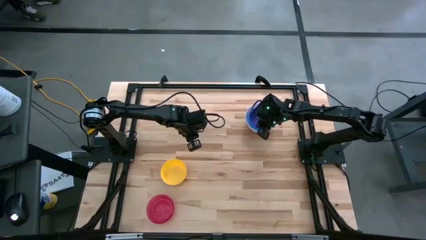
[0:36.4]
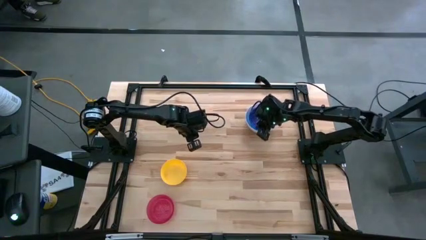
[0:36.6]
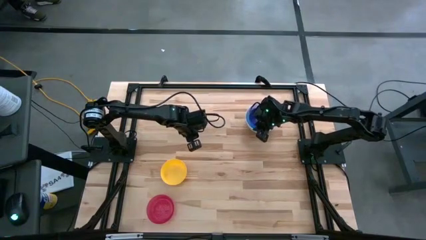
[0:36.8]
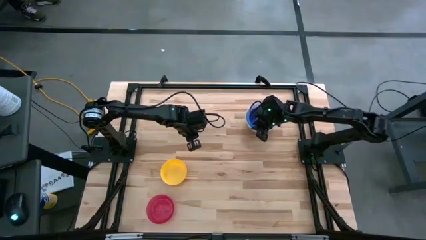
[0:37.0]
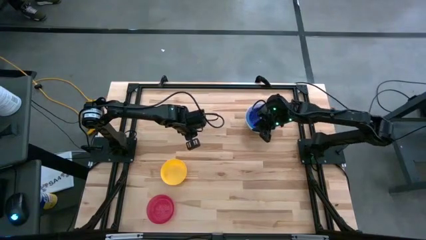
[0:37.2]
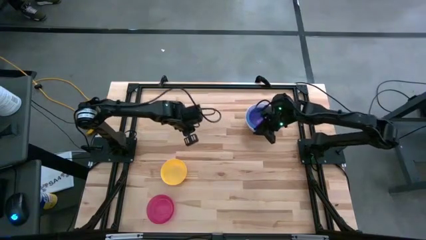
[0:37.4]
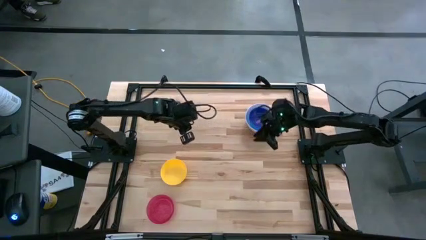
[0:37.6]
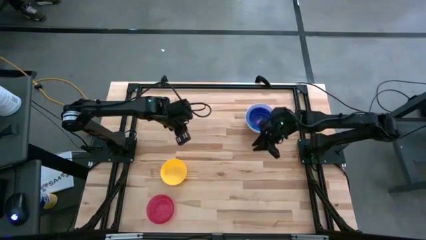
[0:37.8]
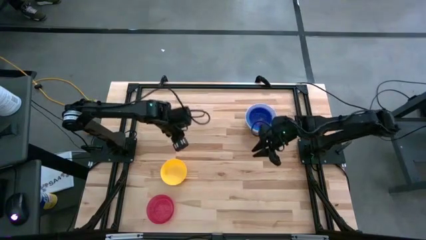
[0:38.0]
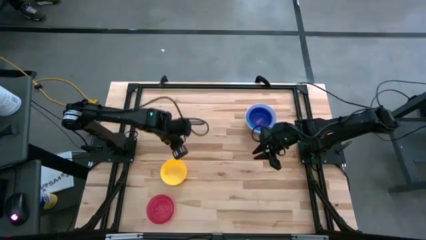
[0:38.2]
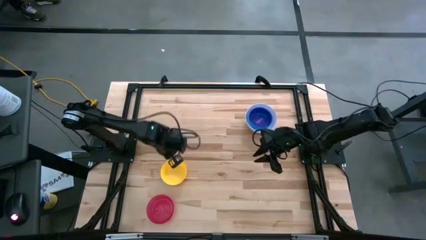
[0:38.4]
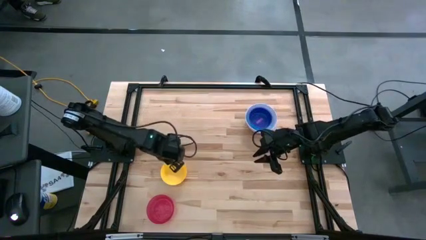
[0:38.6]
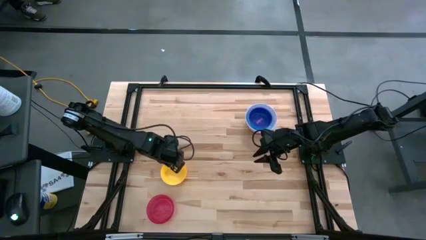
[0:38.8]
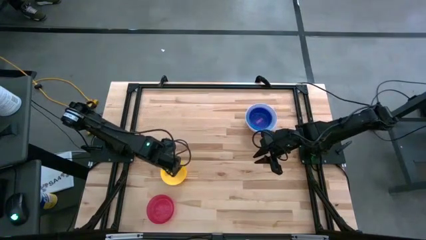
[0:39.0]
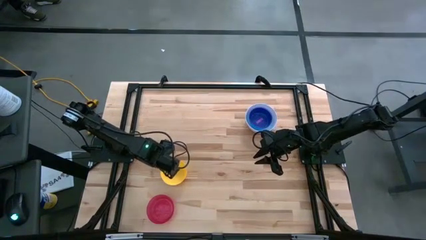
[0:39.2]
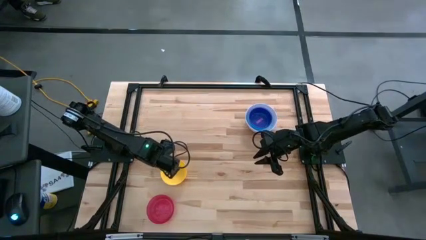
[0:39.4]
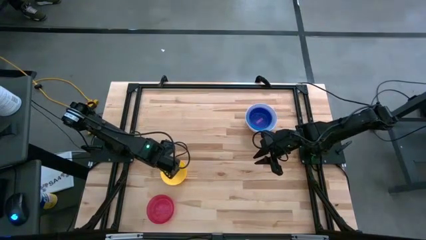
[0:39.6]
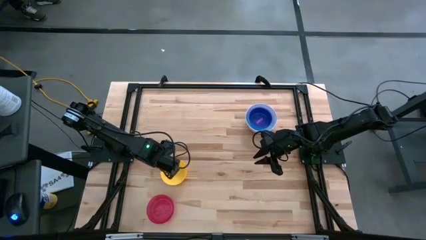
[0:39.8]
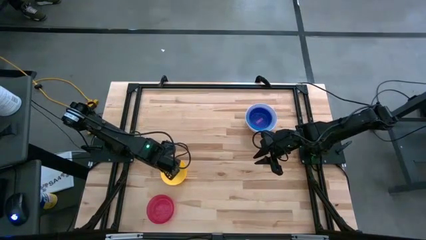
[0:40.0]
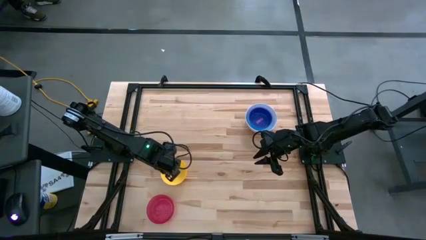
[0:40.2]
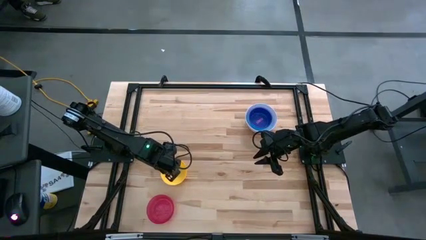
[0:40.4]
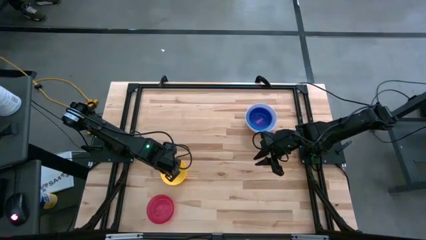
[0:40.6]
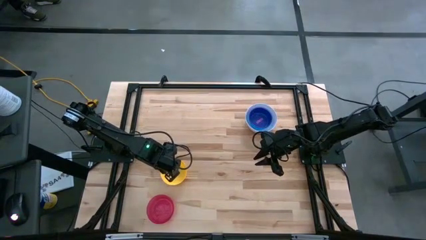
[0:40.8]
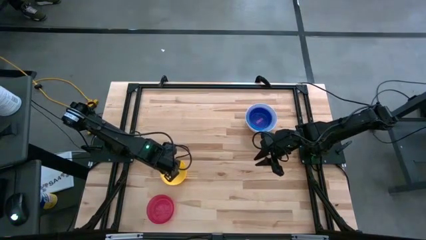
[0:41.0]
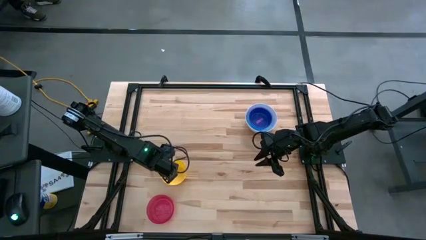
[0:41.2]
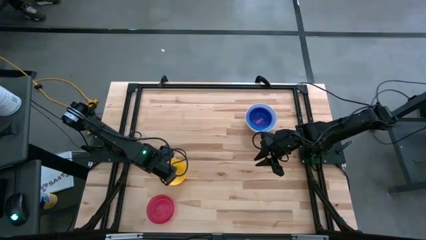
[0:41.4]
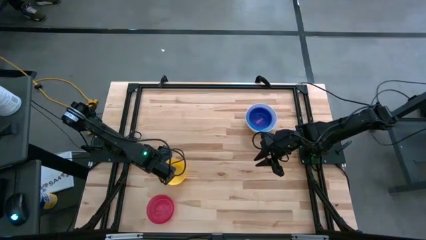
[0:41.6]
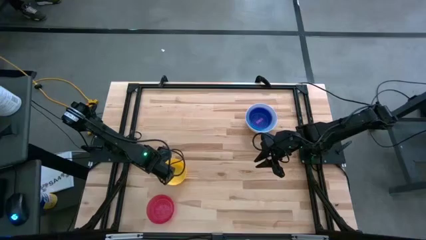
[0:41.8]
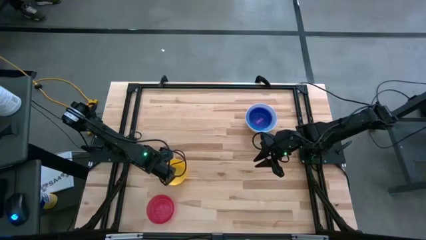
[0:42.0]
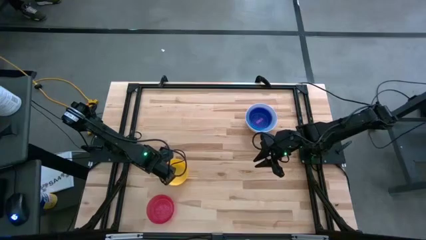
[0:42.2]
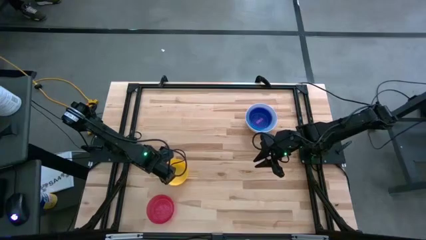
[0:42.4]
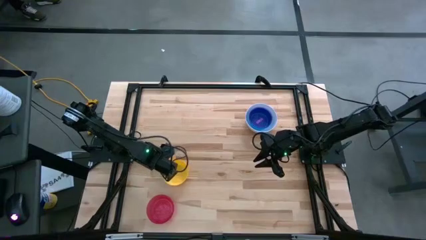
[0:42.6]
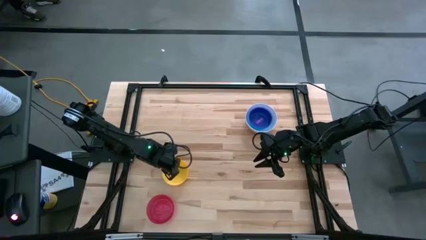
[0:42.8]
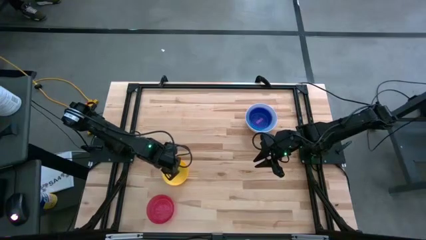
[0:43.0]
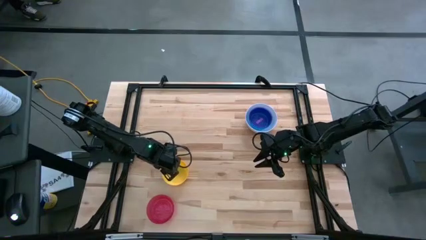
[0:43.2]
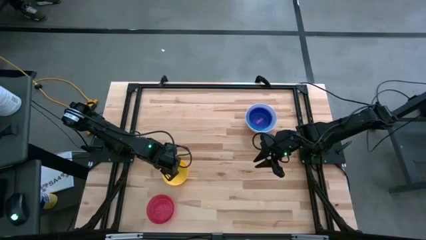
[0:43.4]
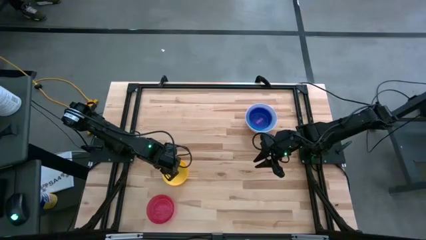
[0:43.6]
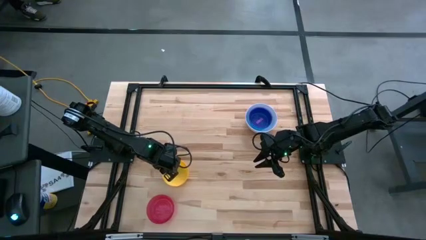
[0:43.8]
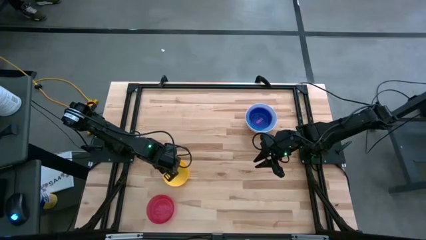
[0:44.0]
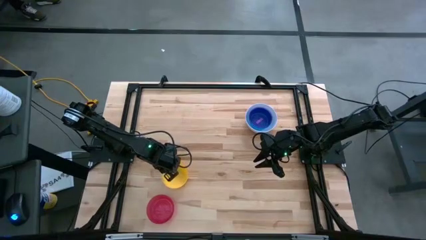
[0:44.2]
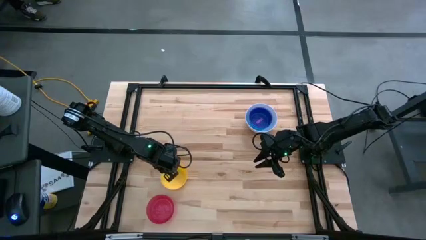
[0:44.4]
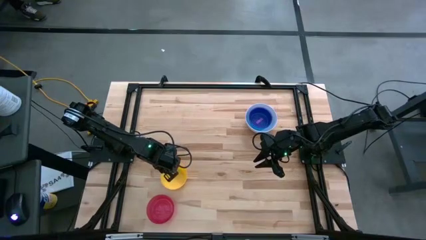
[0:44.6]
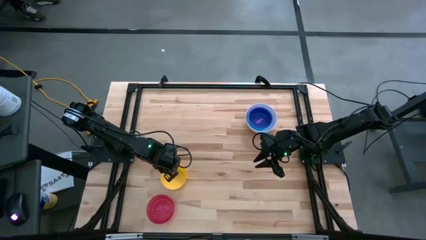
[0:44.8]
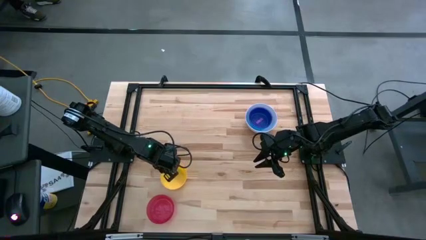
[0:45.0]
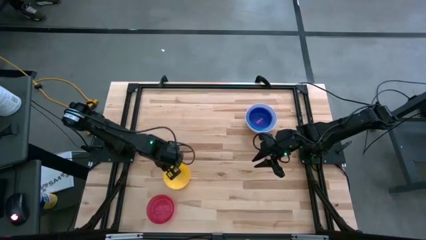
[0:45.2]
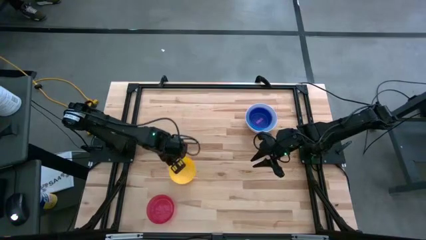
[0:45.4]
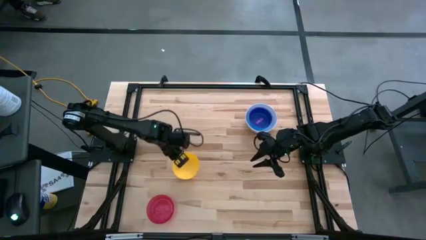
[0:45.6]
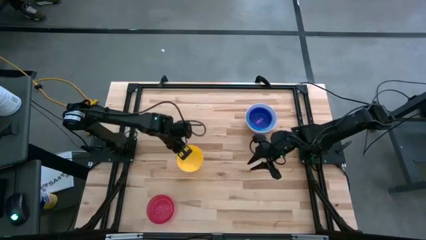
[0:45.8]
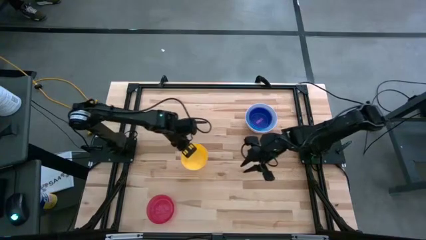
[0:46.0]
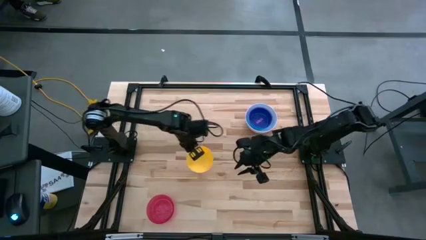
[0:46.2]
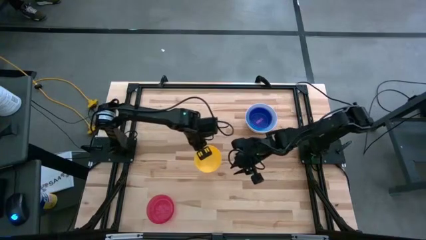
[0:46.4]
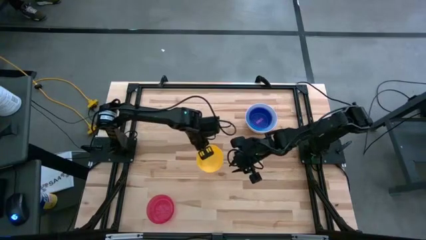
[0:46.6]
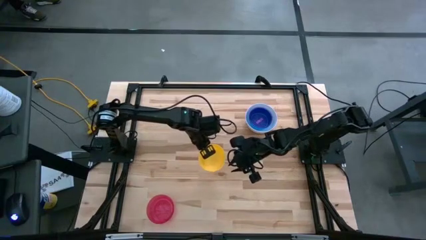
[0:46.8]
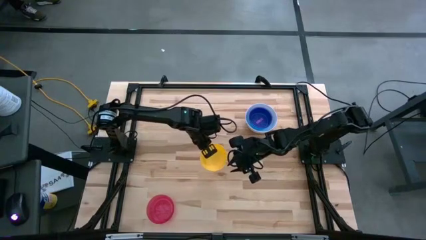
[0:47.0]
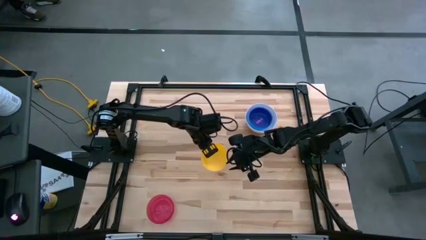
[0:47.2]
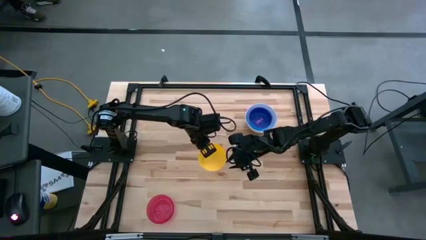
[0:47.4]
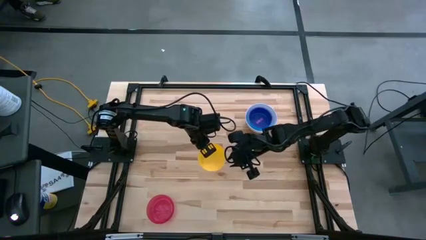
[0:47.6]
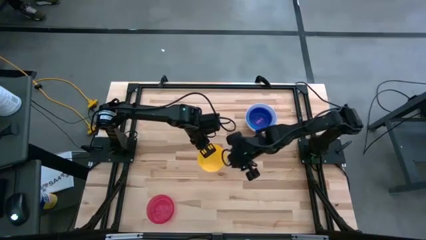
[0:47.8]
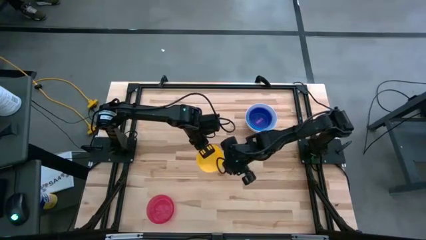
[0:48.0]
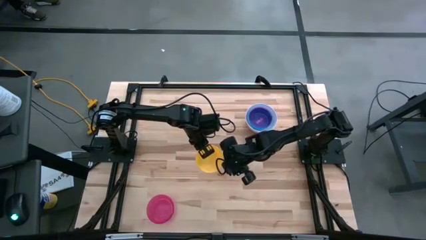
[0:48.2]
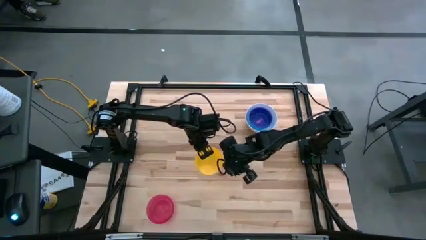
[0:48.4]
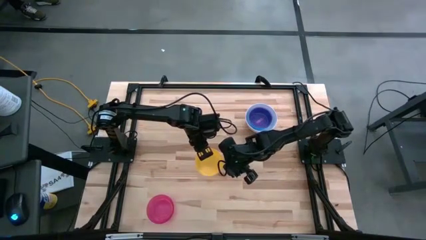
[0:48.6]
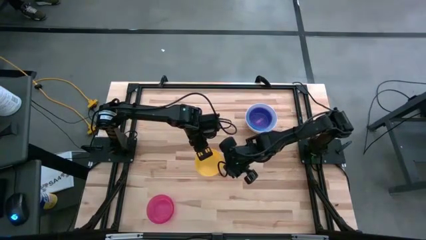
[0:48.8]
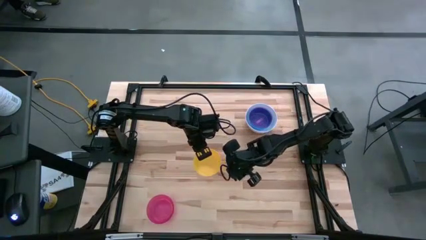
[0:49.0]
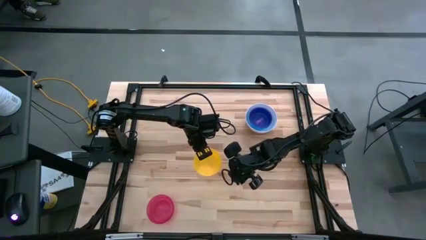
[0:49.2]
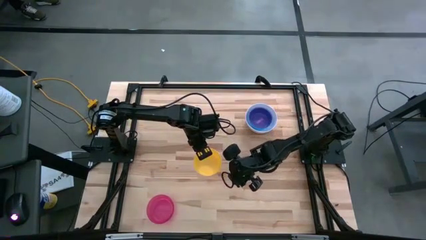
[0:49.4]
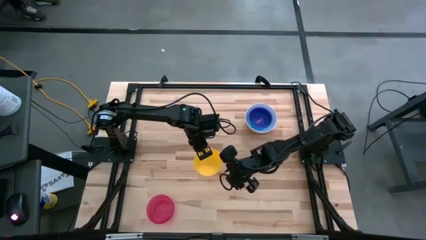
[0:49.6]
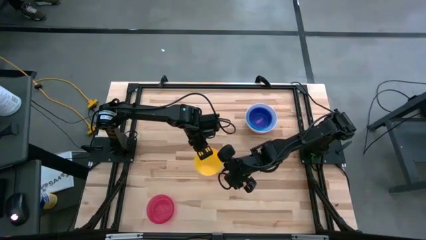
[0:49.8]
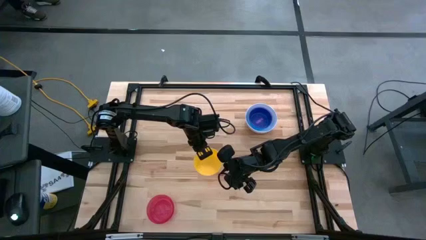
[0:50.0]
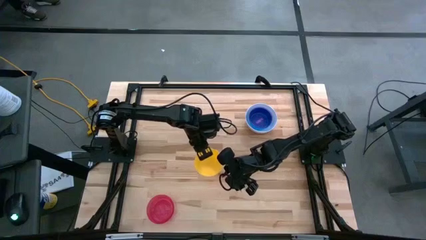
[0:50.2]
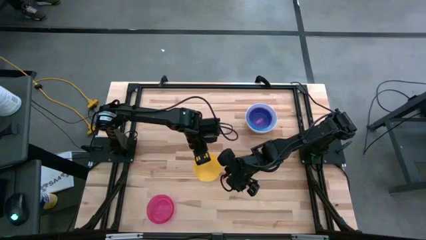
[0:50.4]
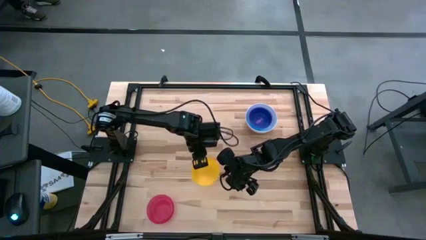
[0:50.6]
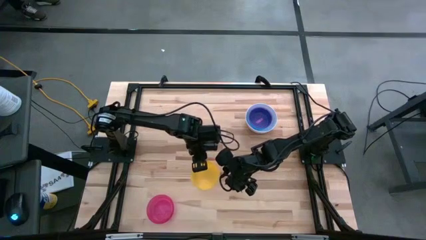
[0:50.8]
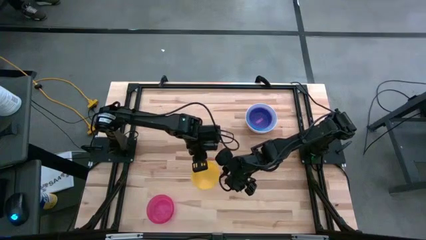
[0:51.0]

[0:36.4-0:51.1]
Stack the yellow bowl on the purple bowl

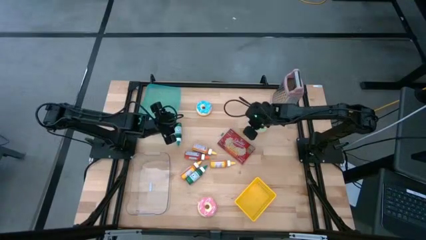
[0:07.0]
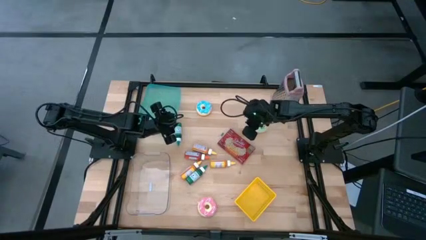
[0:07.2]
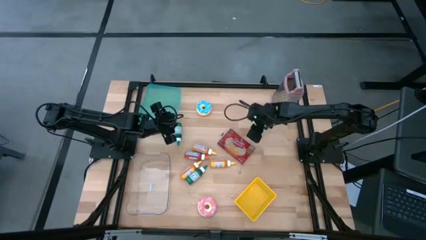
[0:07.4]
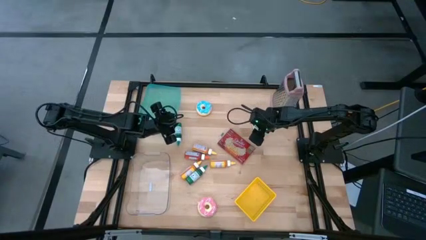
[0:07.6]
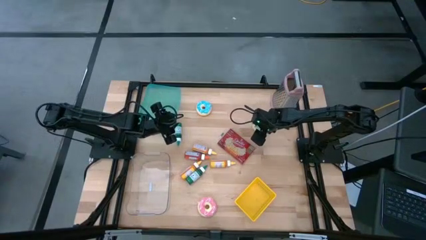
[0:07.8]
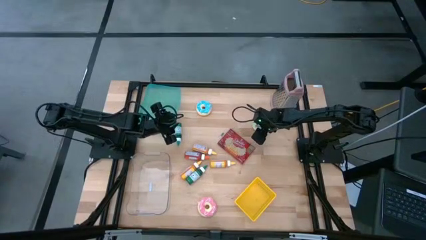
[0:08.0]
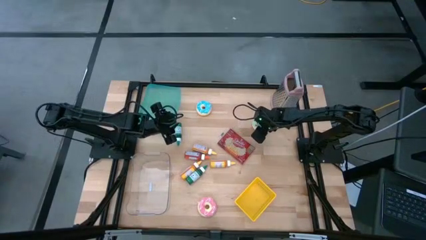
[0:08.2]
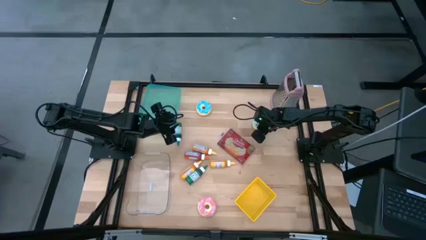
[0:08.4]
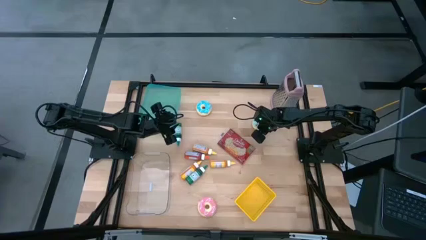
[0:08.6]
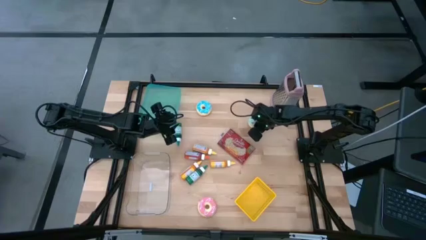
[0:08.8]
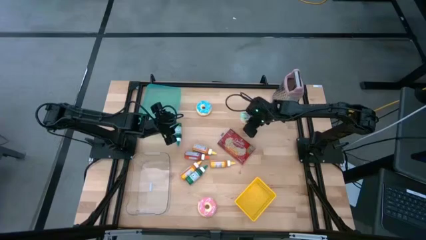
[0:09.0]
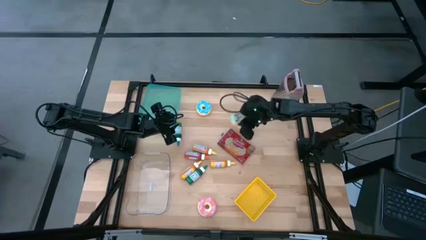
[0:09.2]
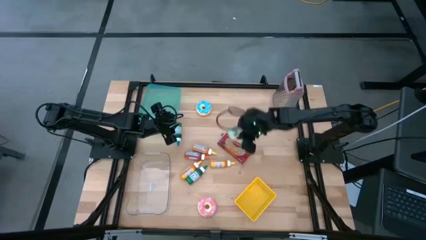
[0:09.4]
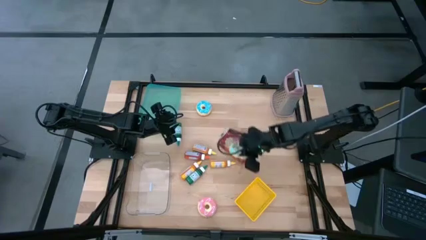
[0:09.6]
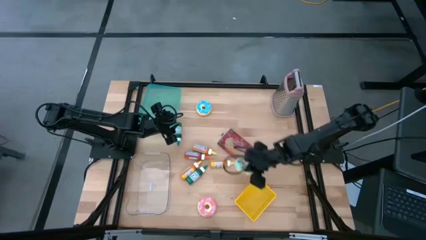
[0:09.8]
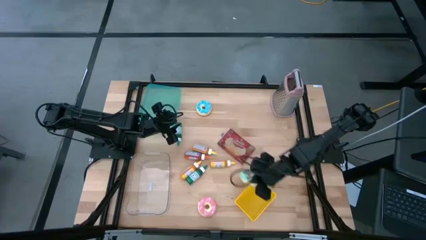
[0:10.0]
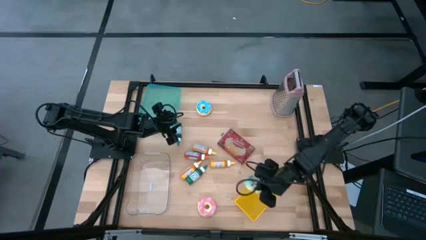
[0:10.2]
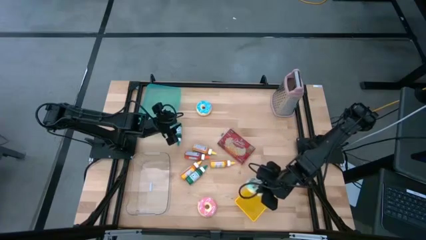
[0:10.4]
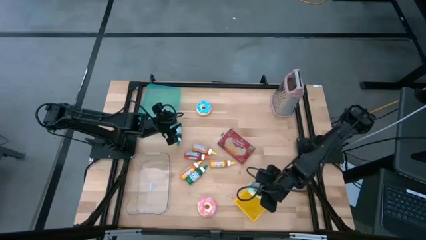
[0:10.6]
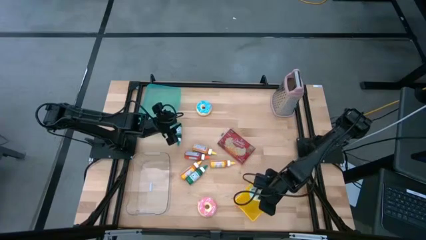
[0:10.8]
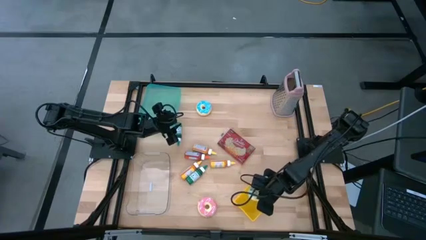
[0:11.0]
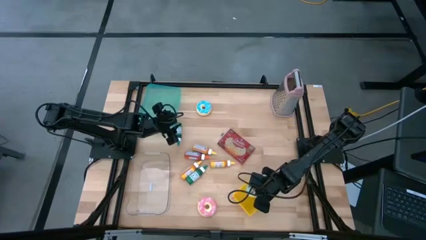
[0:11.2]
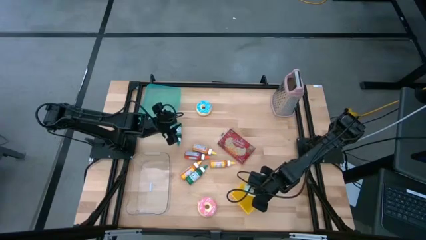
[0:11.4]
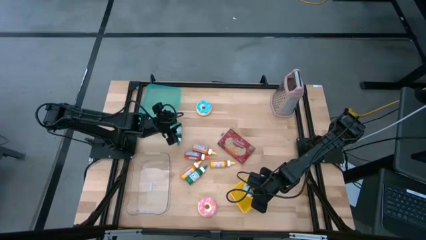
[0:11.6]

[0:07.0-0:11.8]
Put the light blue donut into the yellow bin
